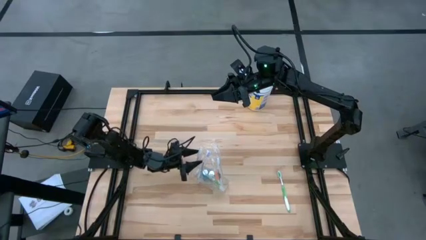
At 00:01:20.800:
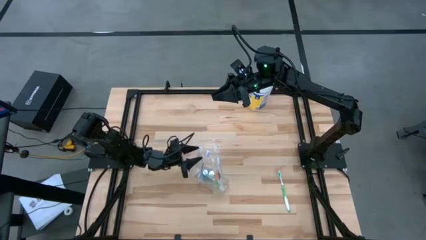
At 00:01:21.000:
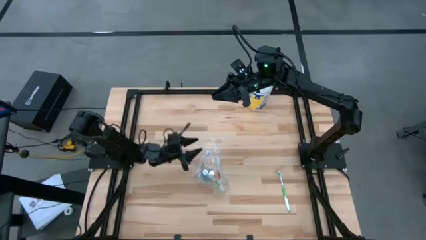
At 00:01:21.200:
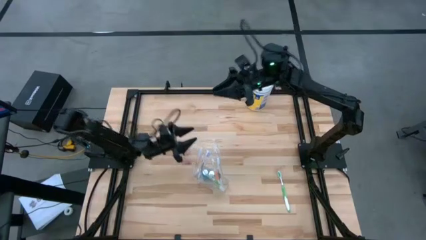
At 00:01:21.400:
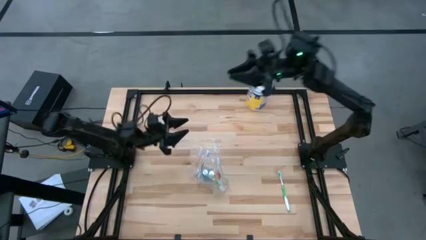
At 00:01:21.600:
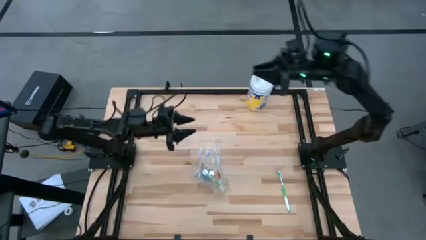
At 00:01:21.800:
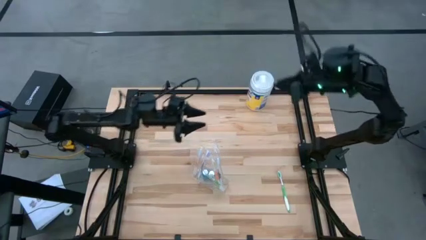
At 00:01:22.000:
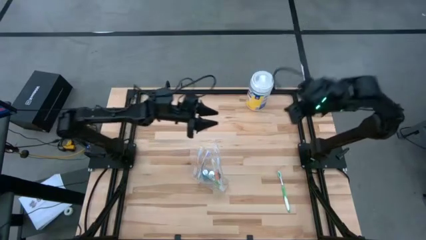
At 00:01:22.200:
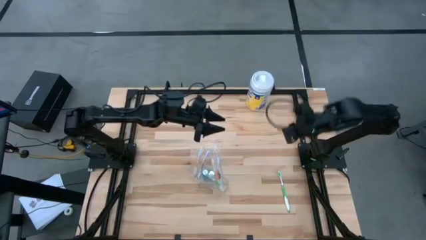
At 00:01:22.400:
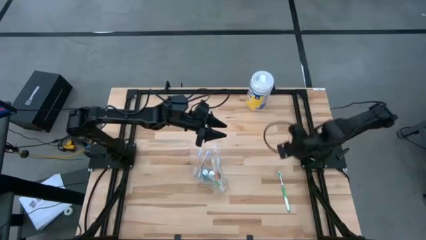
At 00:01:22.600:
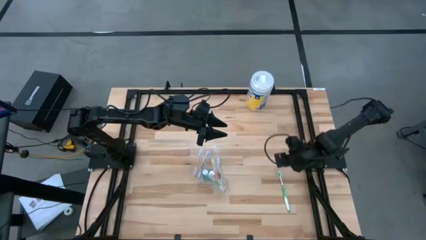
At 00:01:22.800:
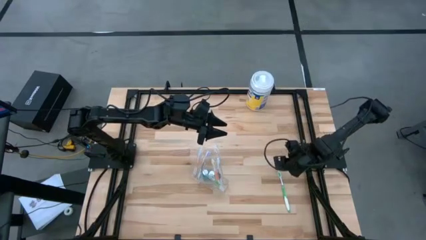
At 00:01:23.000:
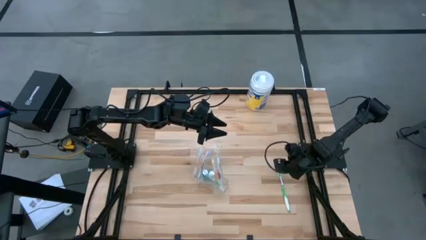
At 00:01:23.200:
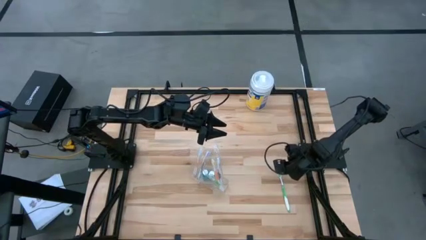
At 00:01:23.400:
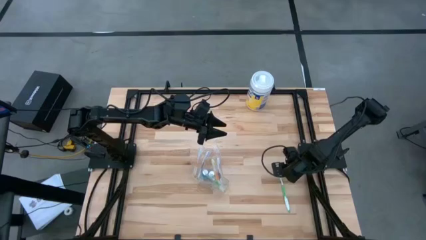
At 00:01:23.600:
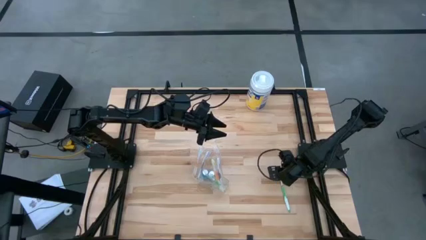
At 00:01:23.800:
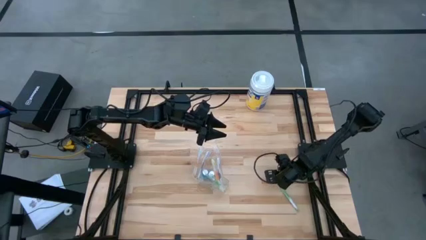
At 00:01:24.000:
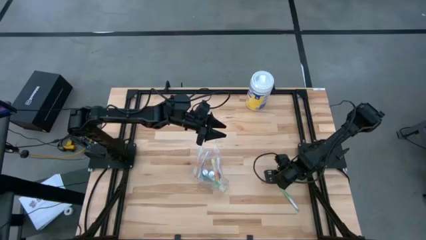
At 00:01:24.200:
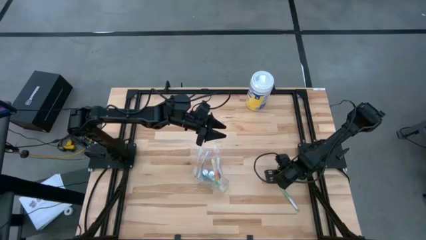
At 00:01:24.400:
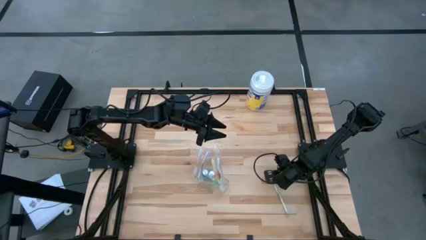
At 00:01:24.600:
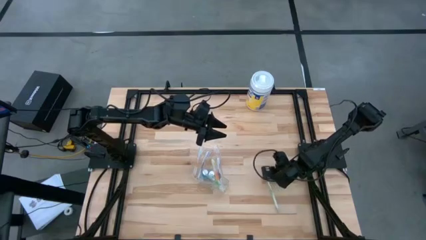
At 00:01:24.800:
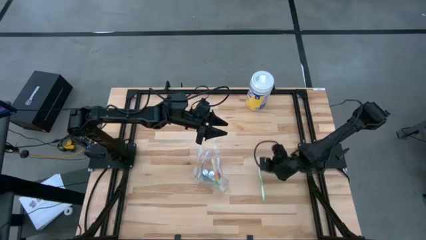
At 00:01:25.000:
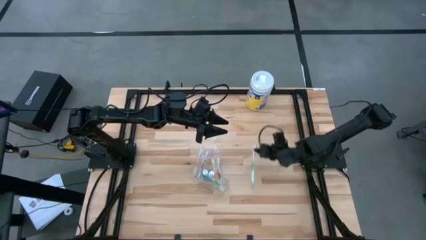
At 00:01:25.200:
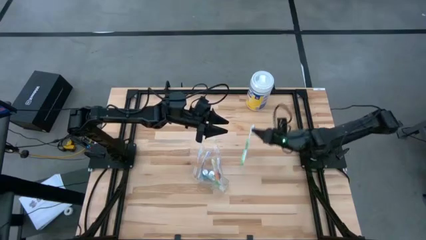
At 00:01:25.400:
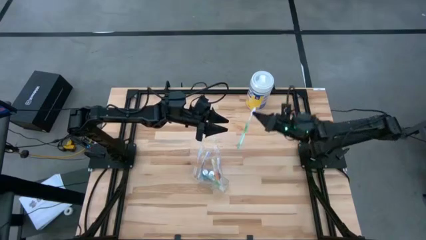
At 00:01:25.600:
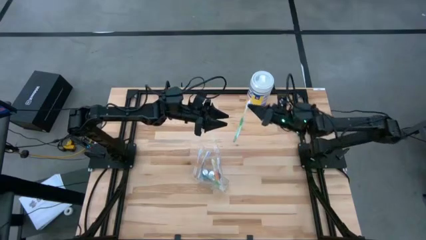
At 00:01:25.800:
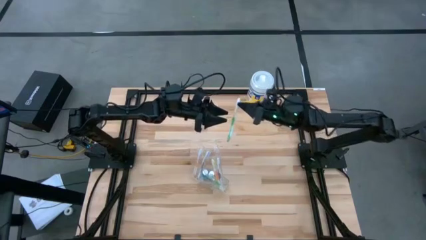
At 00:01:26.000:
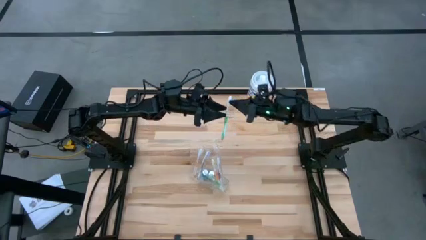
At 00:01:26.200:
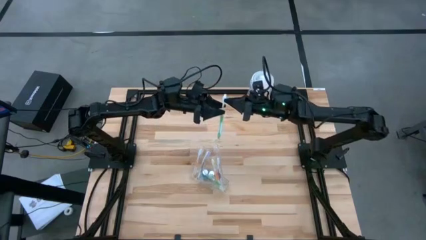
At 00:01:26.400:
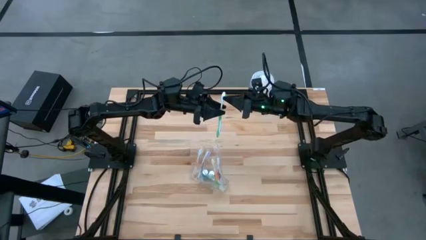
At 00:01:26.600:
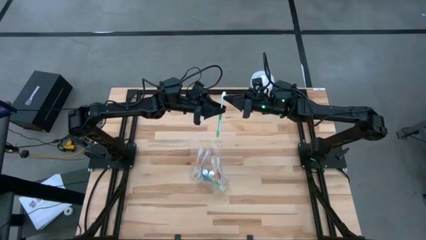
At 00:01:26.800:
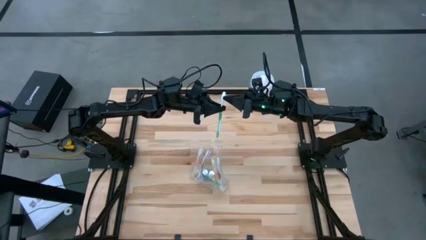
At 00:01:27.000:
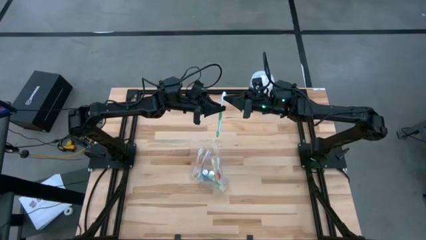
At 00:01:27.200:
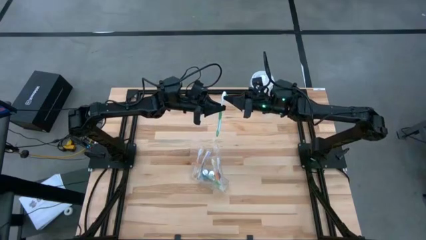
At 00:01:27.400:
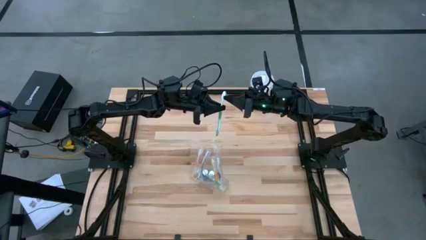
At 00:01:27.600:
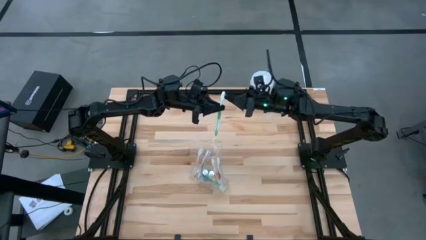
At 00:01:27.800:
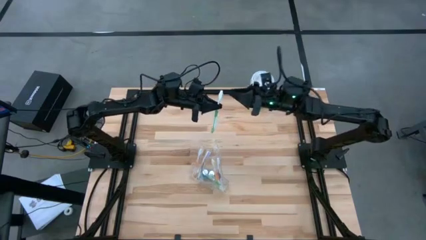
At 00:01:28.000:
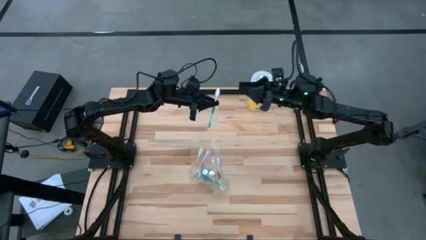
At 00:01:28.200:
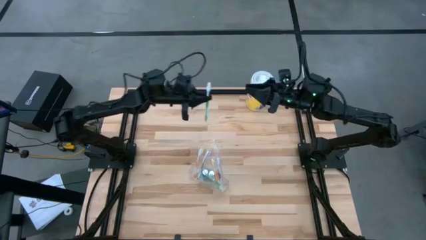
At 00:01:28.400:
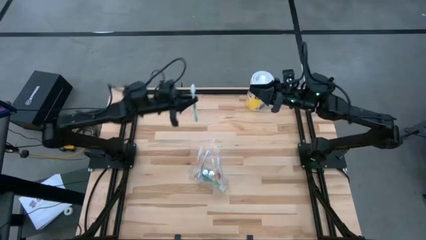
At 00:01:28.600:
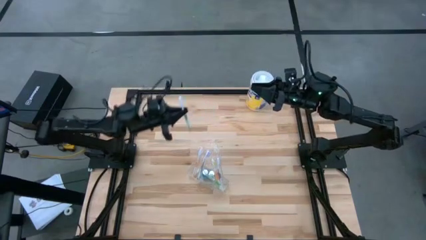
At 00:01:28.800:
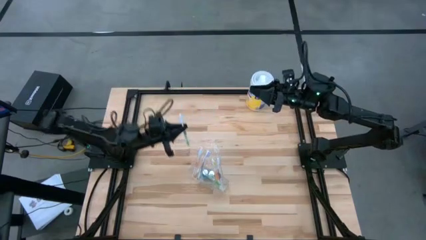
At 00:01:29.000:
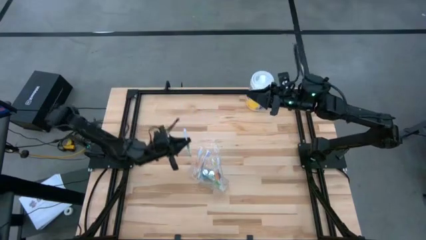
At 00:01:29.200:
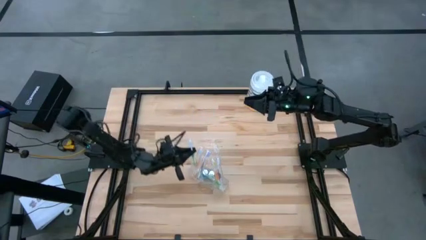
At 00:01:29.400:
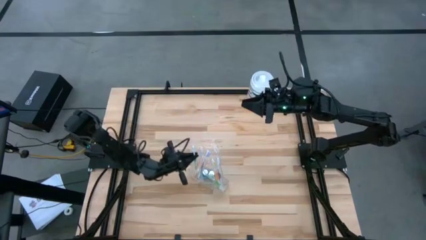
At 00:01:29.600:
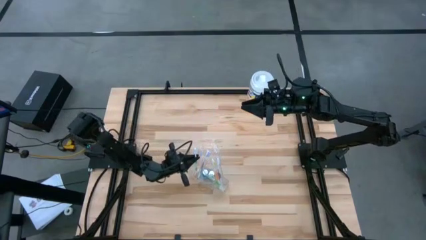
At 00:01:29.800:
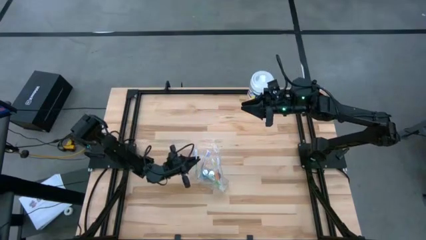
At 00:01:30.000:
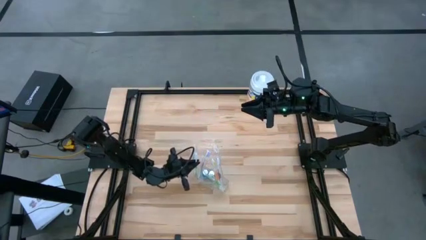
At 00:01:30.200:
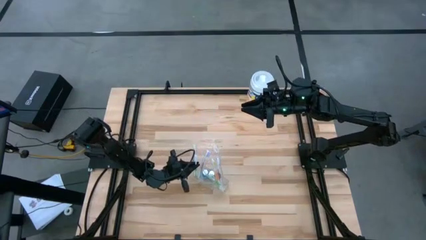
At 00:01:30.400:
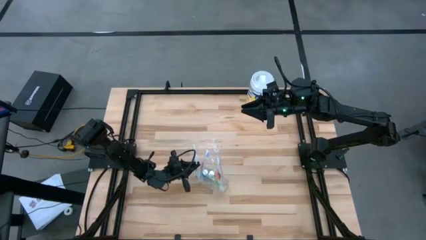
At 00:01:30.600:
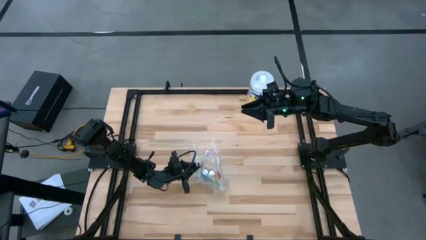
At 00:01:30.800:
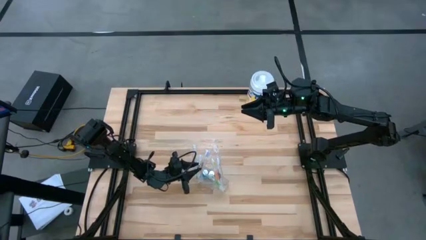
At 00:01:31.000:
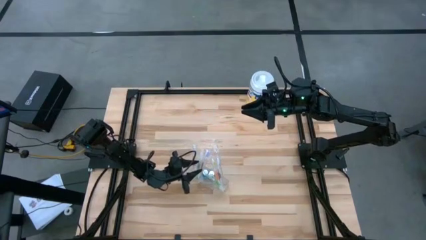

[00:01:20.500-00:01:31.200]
Task: Pick & Place toothbrushing station
Put the green toothbrush into the transparent organizer
